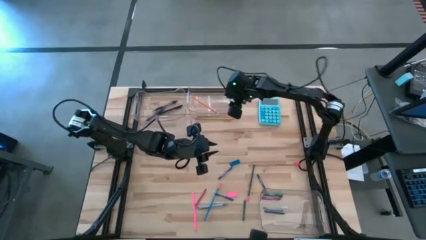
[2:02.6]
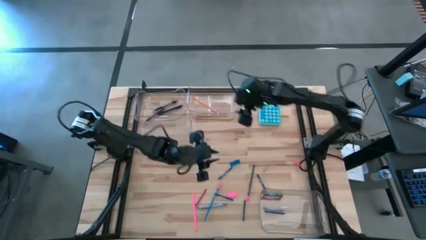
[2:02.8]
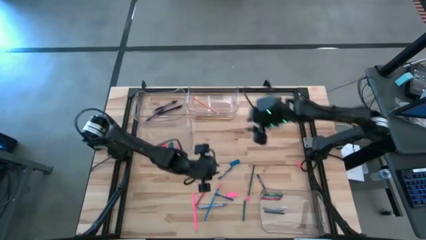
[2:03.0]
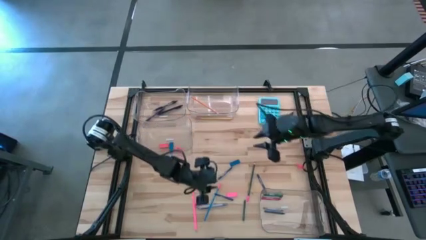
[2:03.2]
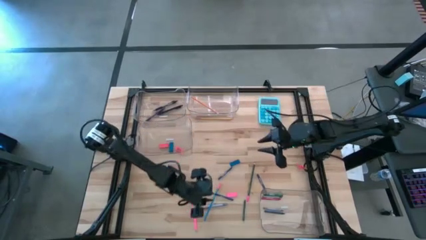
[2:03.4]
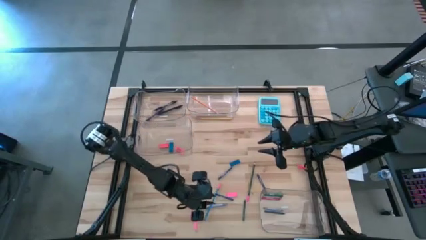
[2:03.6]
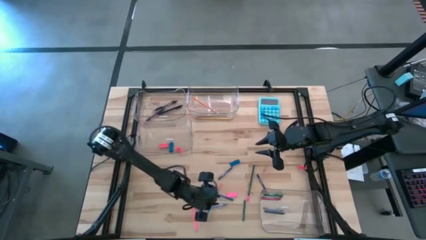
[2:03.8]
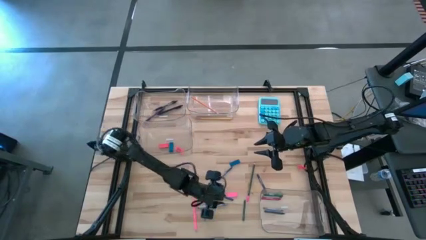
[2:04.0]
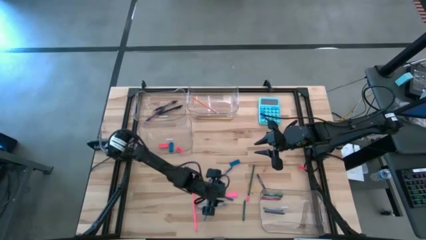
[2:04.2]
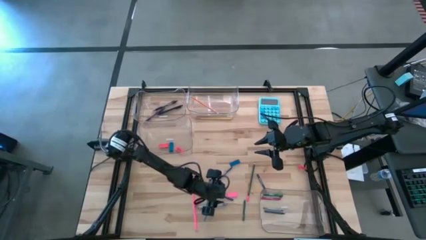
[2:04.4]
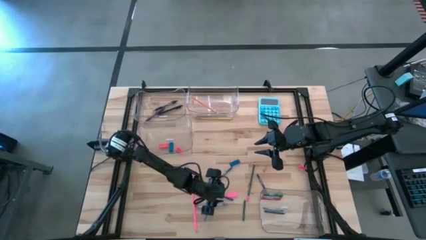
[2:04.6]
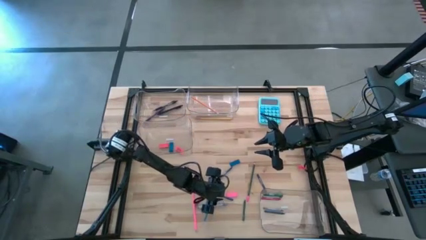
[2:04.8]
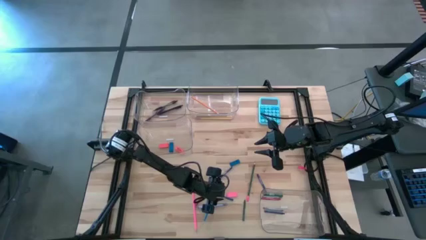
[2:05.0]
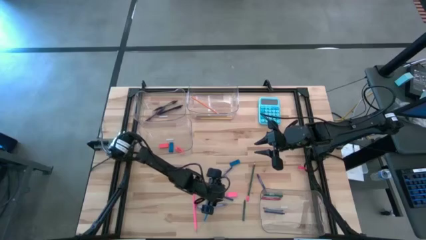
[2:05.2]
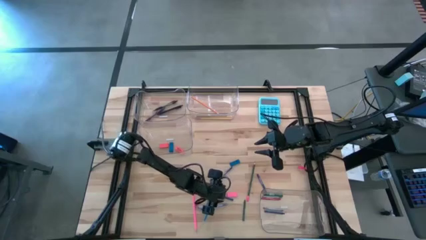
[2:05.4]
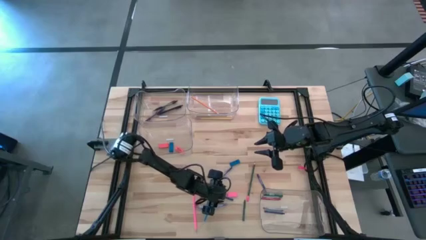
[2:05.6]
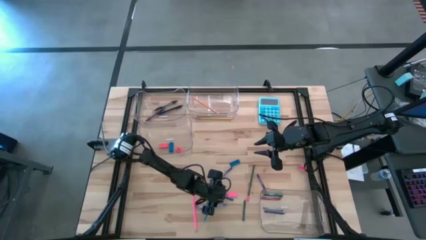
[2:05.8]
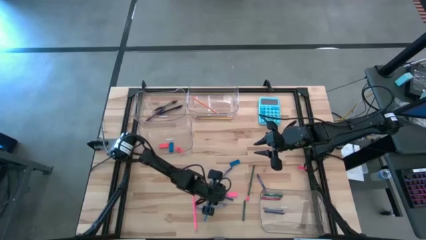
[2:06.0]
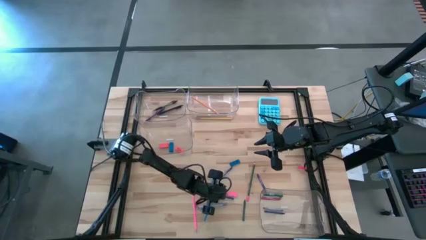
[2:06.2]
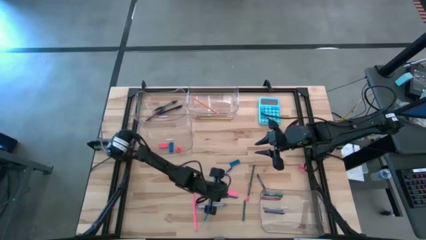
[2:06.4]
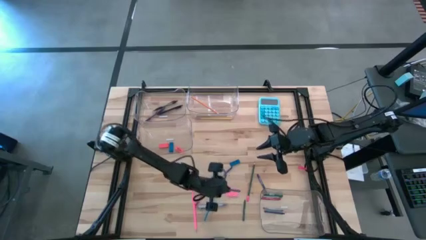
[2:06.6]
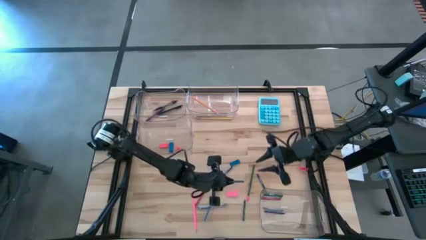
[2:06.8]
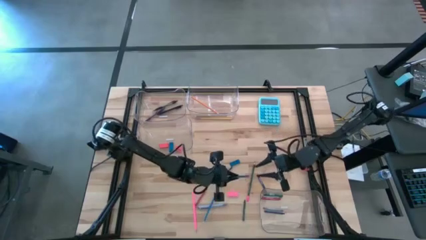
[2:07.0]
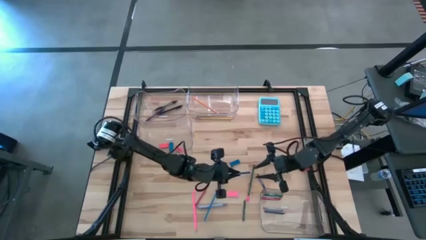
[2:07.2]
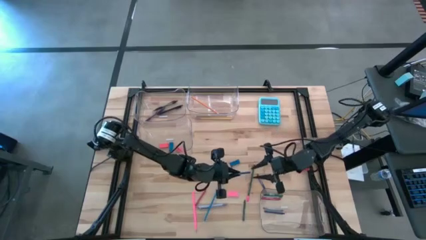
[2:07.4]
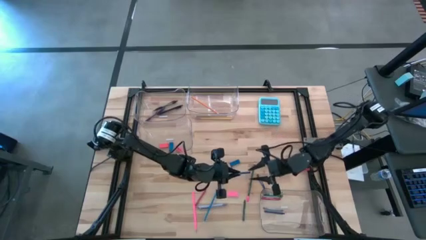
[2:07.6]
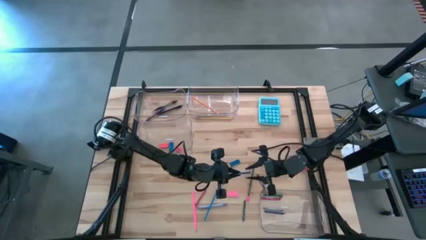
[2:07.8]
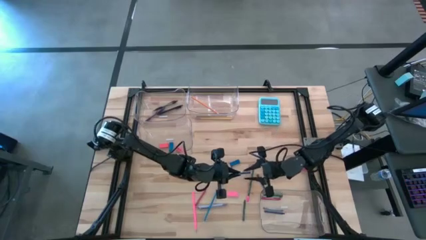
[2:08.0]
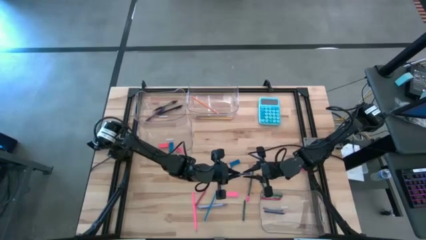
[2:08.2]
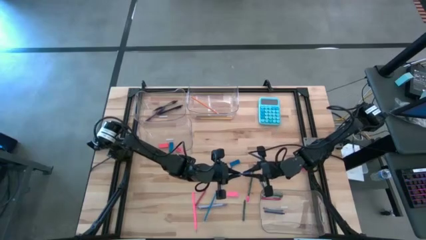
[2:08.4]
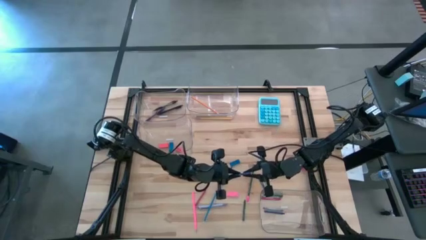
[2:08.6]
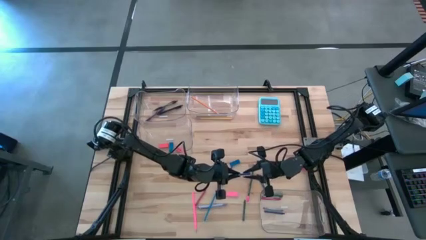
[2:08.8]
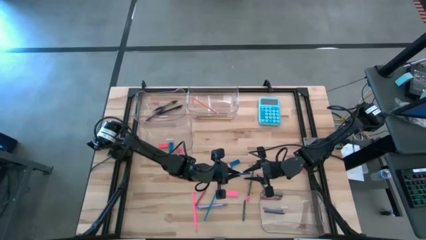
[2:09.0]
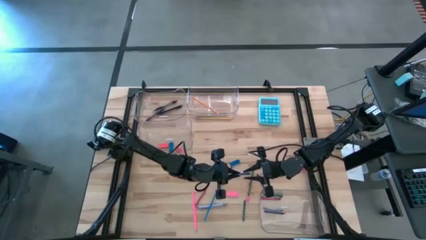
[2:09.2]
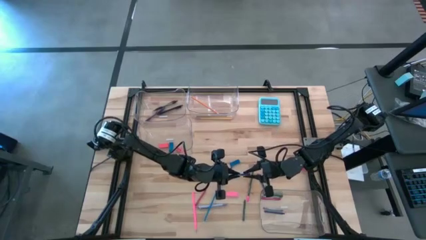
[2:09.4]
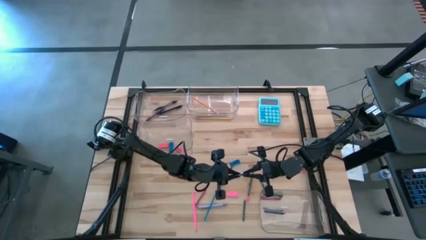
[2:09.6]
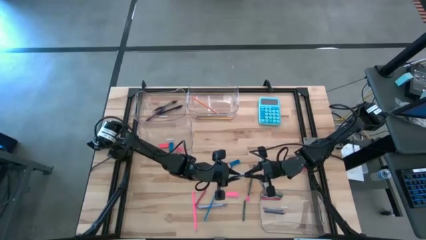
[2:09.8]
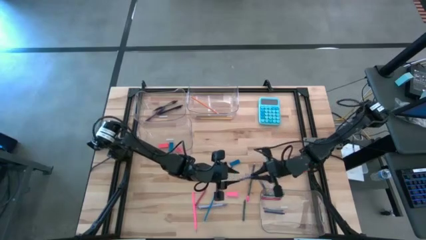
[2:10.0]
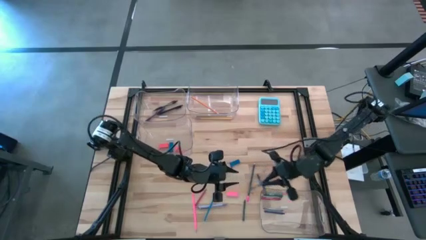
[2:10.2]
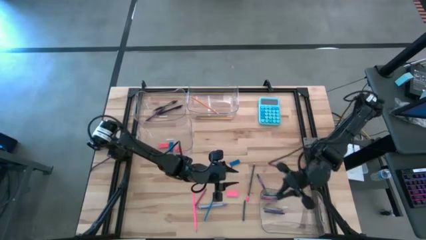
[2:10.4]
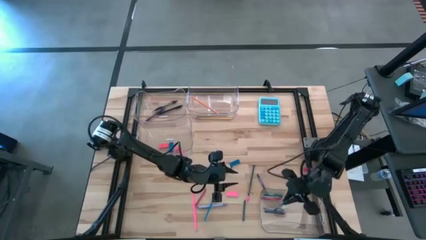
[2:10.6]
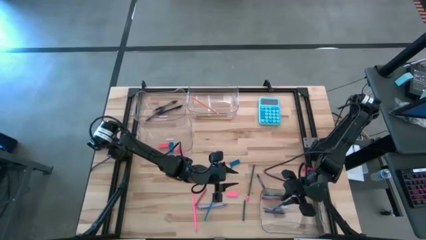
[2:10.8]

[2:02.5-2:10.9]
Task: Sort crayons/erasers/pens/pencils in bins
Put the blue crayon into the bottom right transparent bin

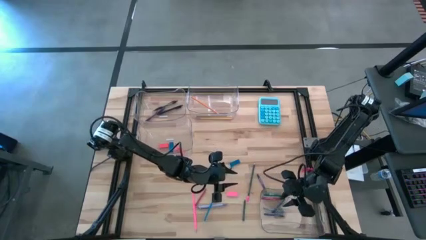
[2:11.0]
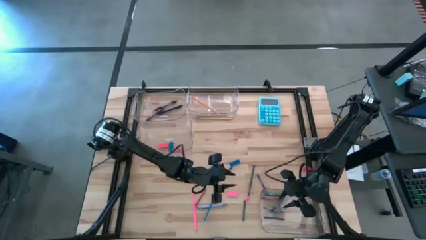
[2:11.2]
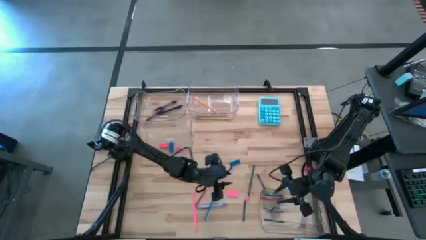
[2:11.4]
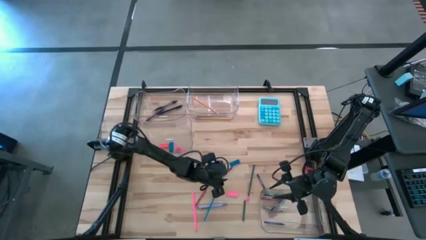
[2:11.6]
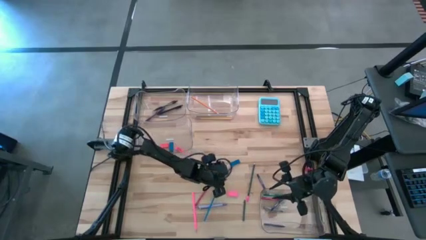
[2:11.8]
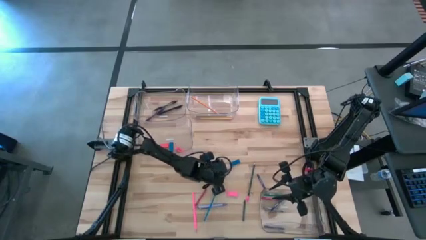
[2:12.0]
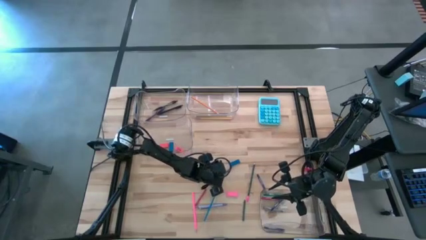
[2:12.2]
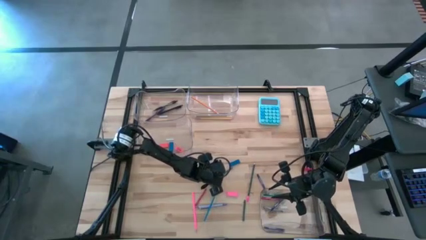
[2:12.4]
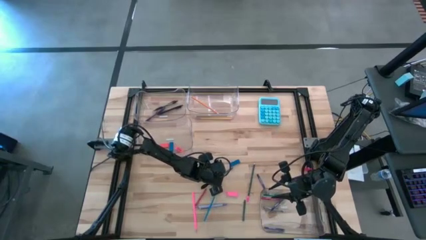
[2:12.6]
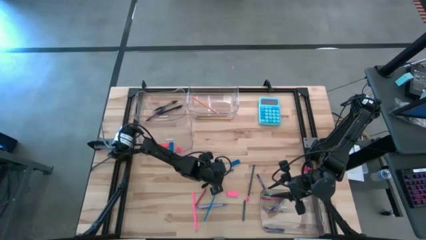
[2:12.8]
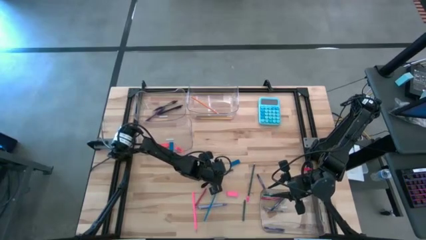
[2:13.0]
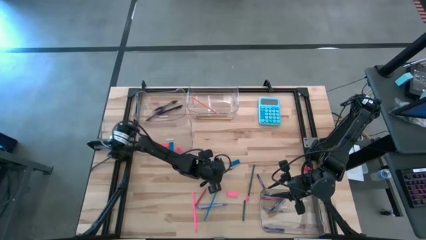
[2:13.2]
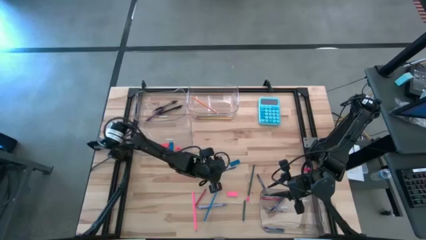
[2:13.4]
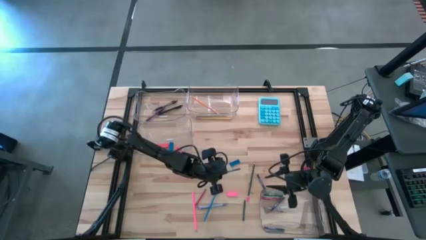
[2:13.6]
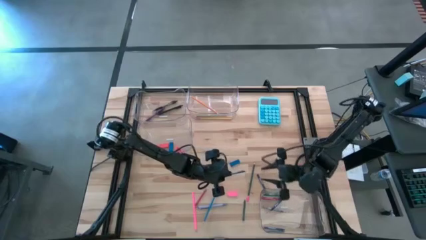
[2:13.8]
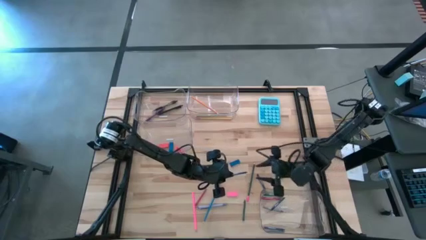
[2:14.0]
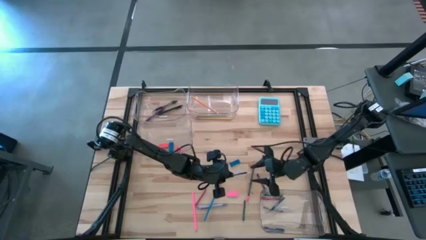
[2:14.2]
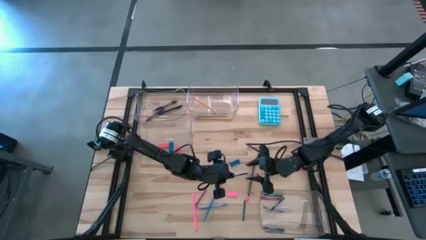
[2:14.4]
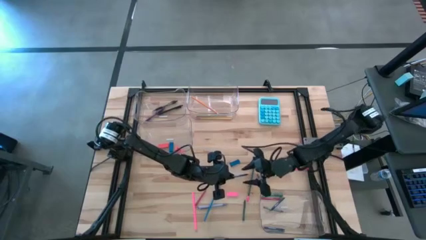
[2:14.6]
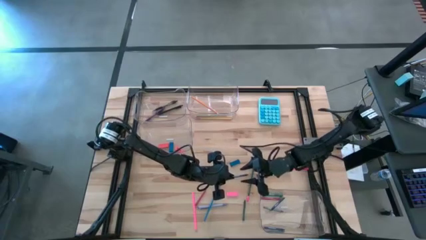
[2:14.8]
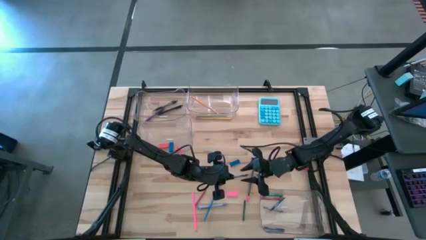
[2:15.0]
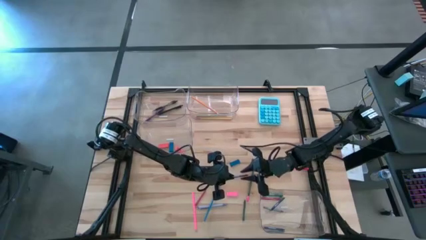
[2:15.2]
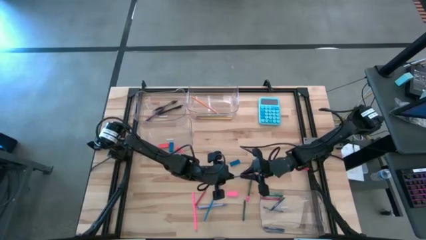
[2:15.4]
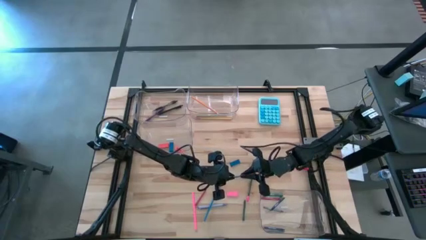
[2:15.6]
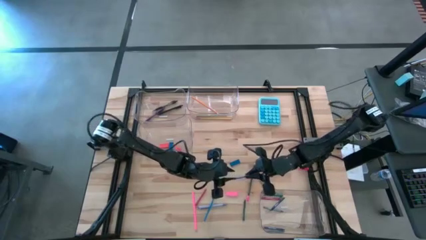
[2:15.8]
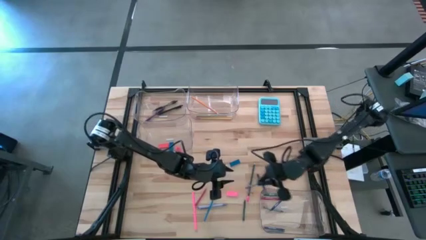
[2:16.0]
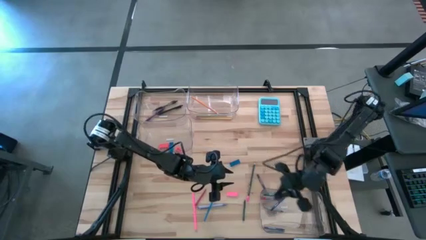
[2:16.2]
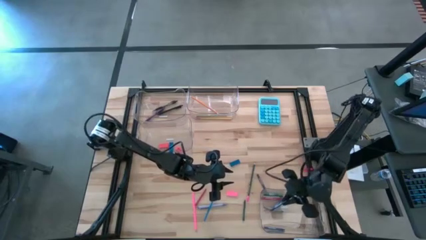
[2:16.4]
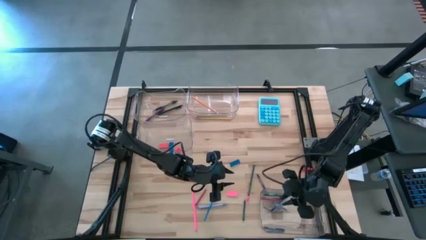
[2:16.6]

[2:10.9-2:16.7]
Put the blue crayon into the bottom right transparent bin

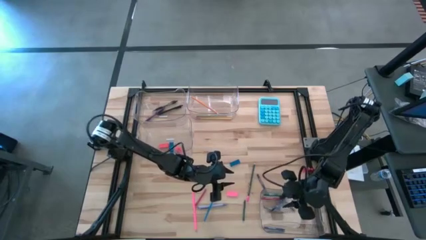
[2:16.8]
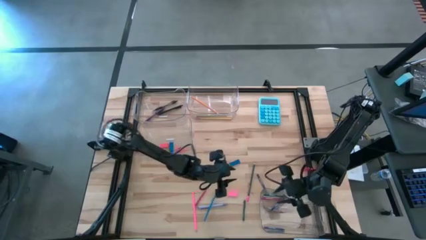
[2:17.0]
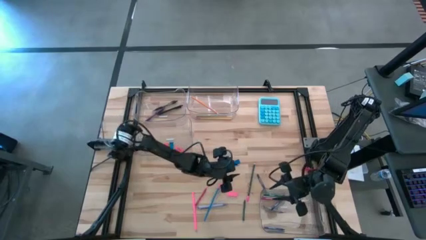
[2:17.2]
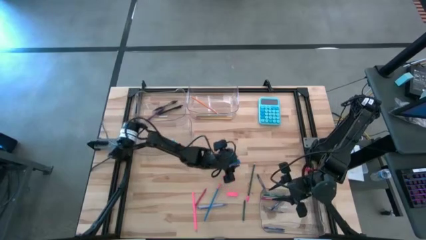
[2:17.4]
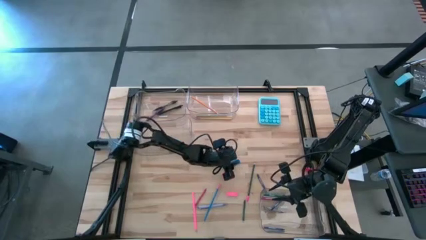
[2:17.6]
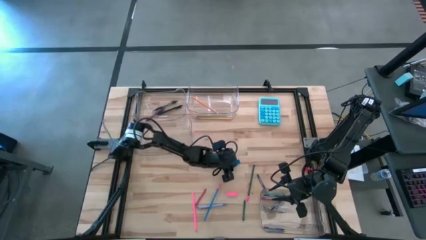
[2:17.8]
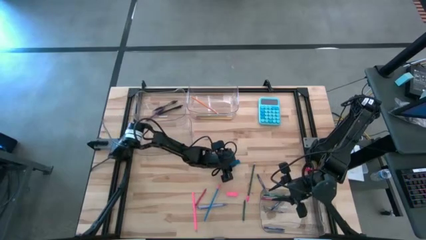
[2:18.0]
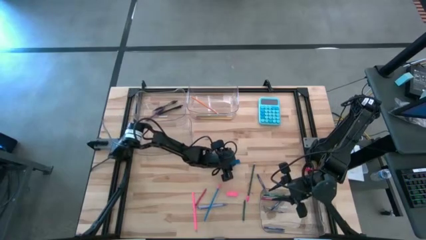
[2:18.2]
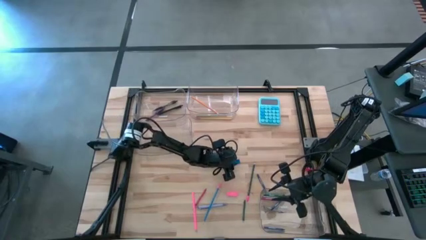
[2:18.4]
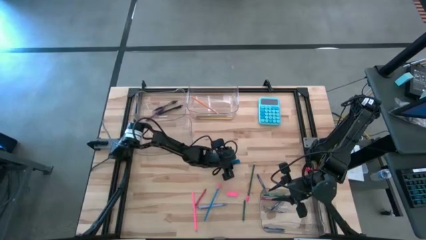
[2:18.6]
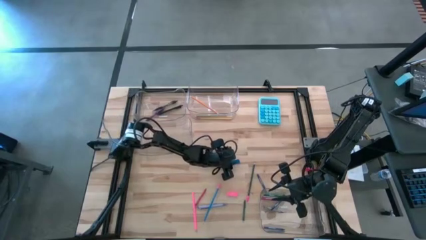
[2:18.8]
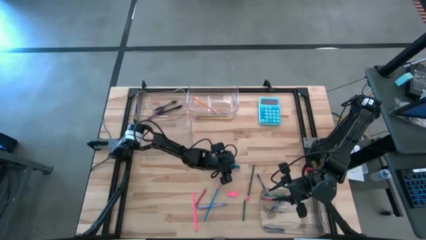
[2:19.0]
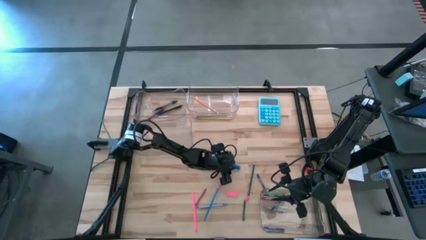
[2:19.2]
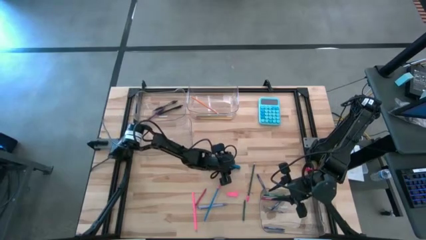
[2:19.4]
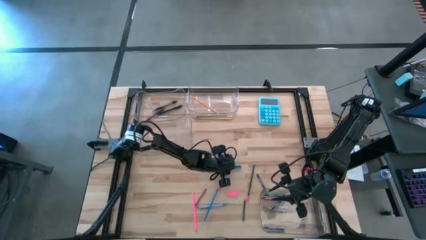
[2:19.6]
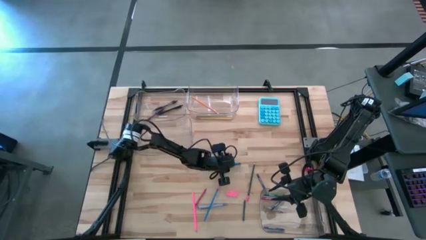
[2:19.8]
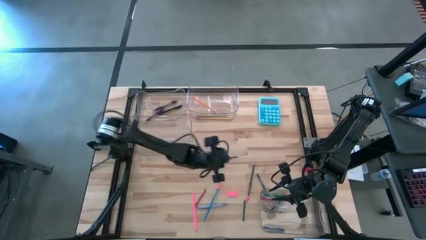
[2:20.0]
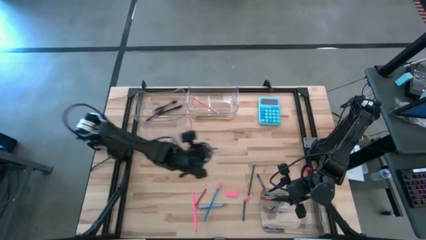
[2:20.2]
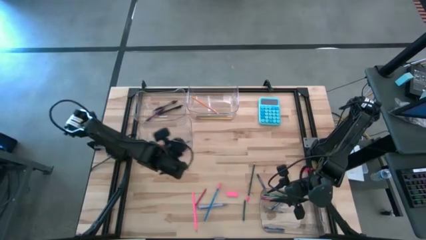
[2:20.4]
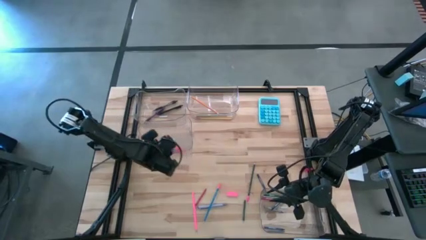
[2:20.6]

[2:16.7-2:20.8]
Put the blue eraser into the middle left transparent bin
